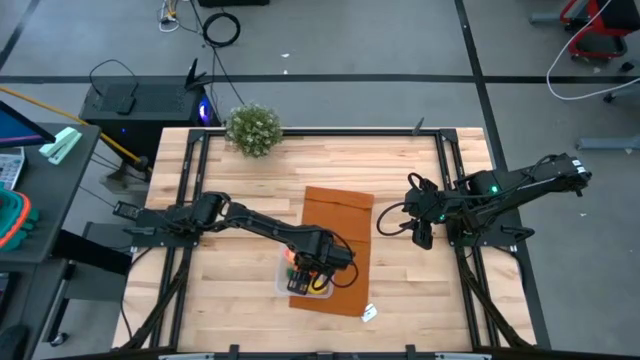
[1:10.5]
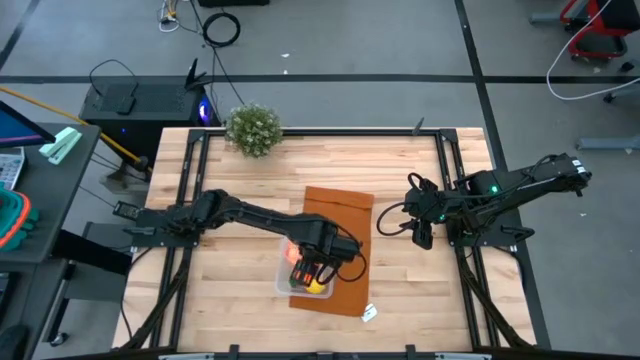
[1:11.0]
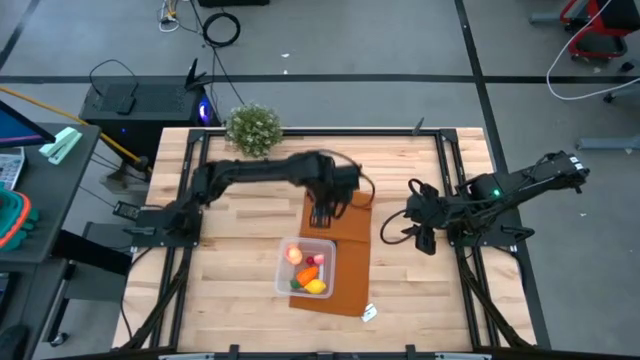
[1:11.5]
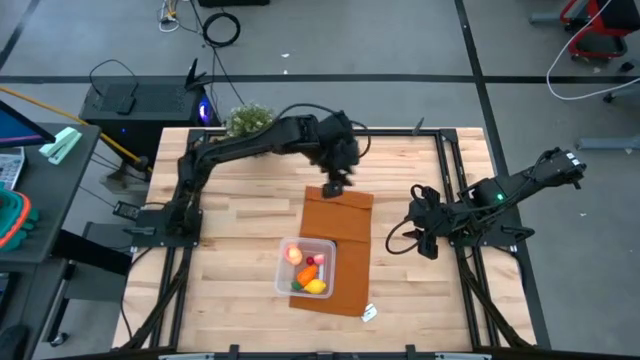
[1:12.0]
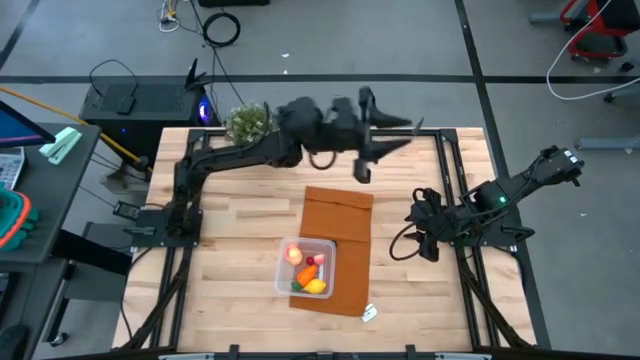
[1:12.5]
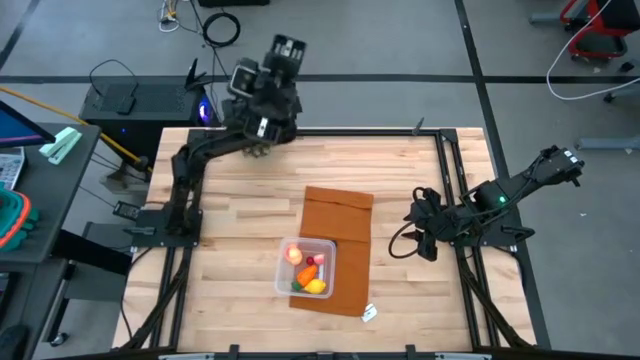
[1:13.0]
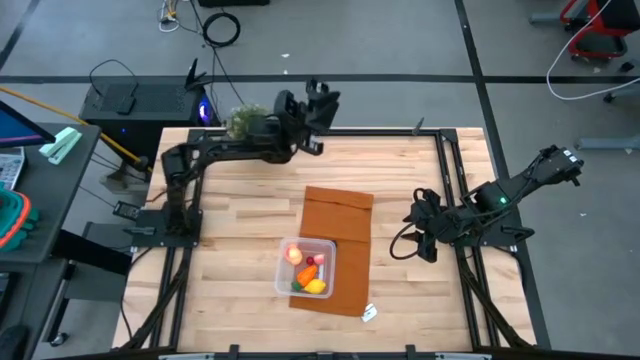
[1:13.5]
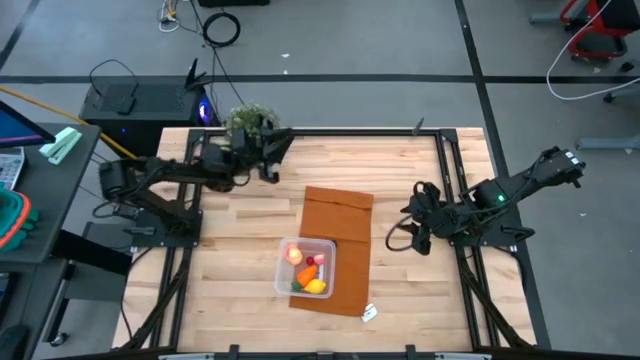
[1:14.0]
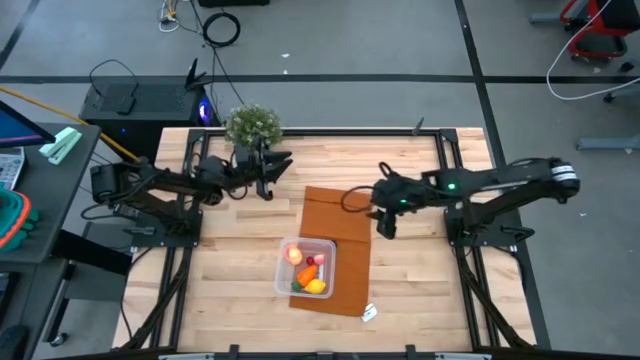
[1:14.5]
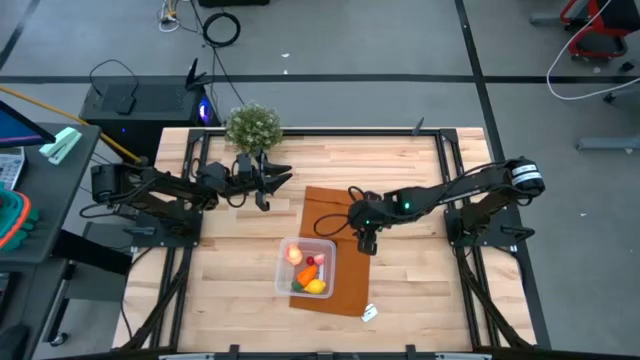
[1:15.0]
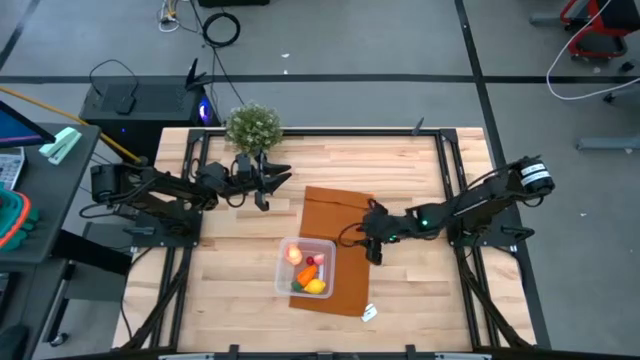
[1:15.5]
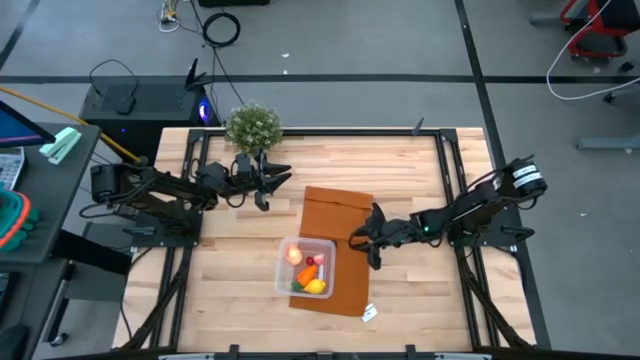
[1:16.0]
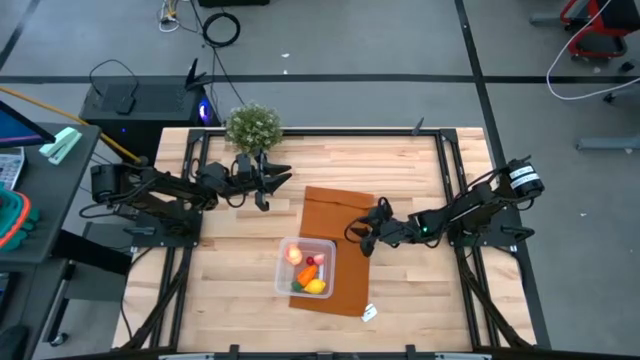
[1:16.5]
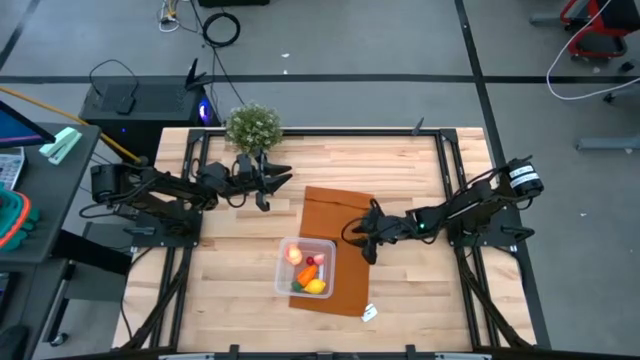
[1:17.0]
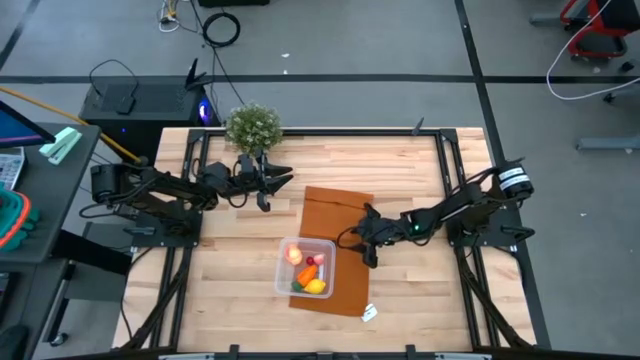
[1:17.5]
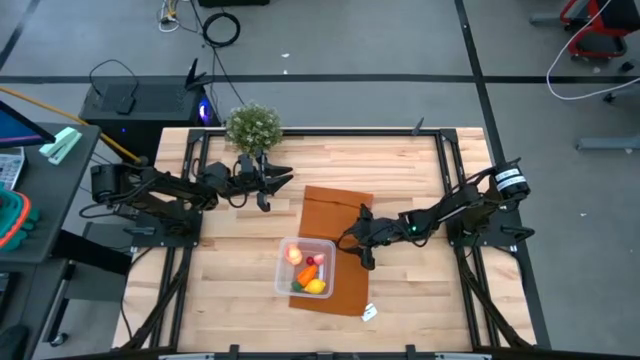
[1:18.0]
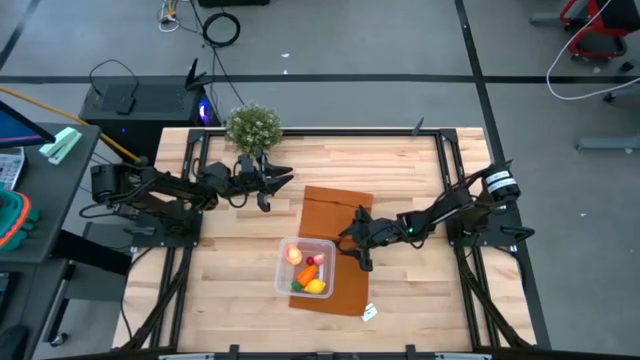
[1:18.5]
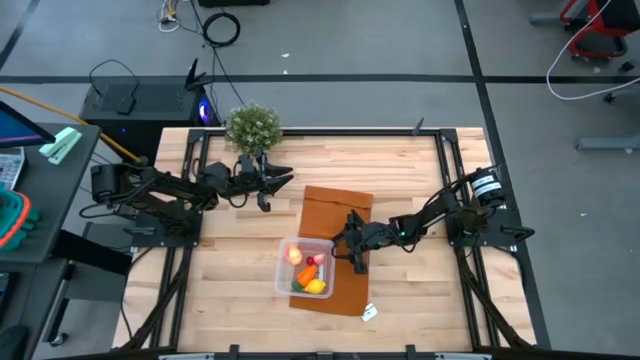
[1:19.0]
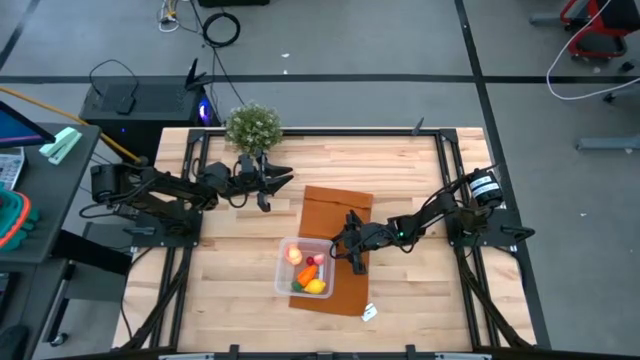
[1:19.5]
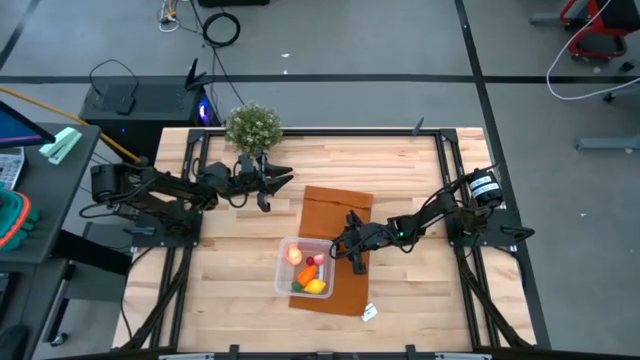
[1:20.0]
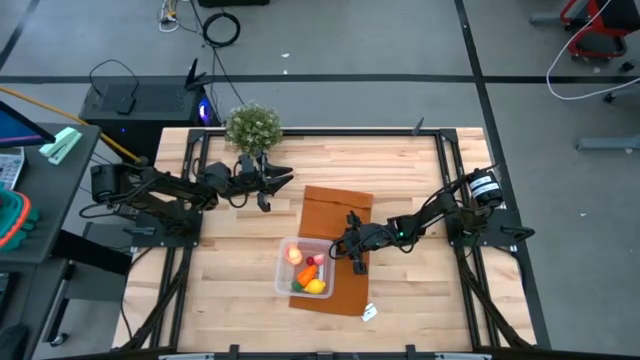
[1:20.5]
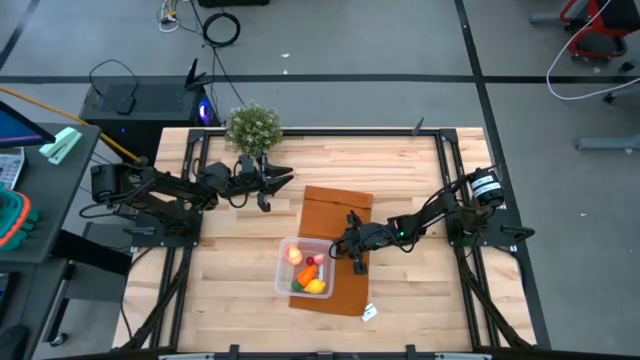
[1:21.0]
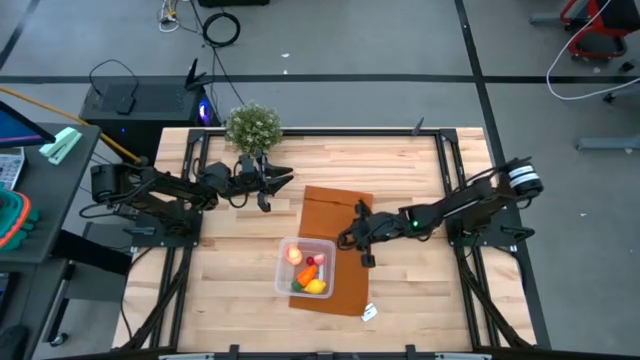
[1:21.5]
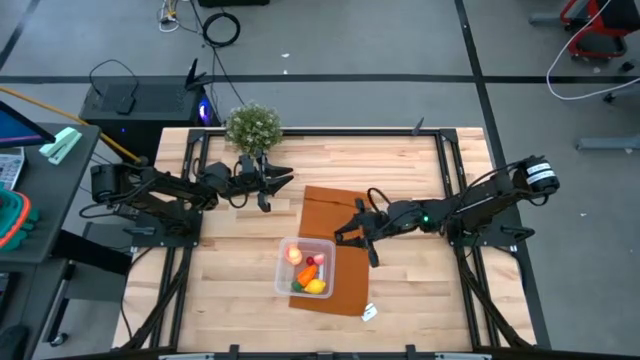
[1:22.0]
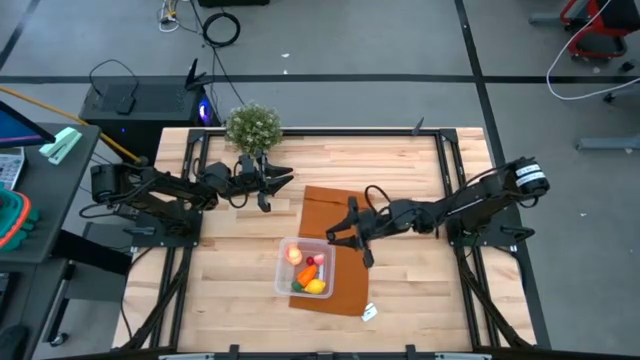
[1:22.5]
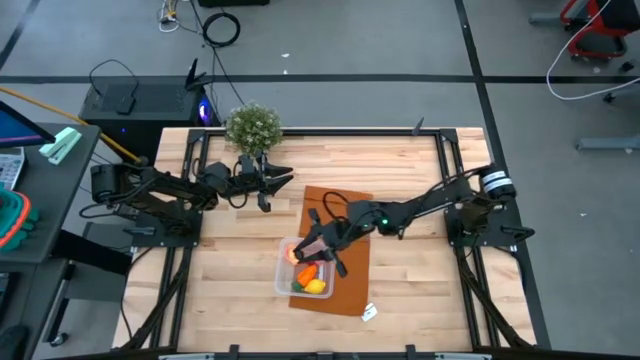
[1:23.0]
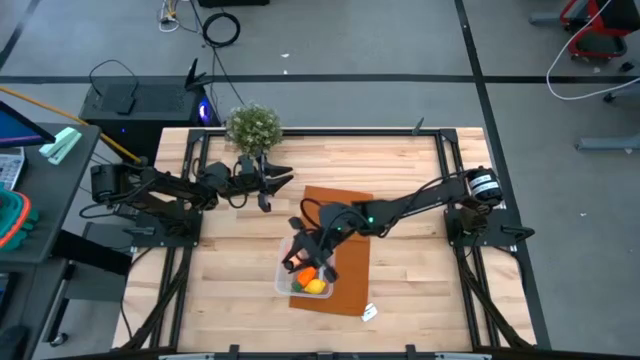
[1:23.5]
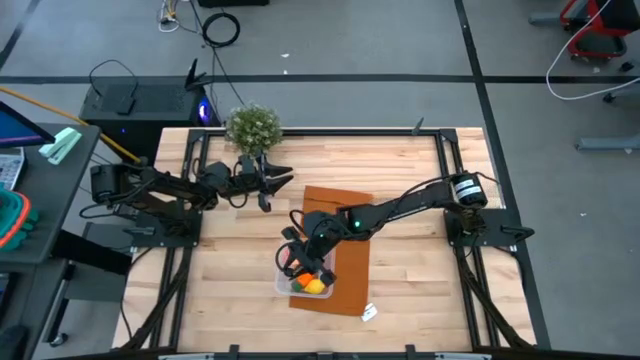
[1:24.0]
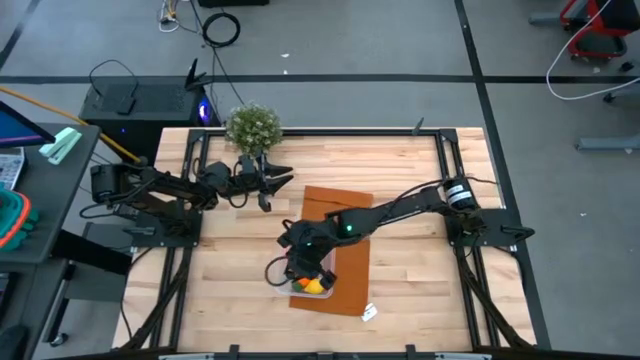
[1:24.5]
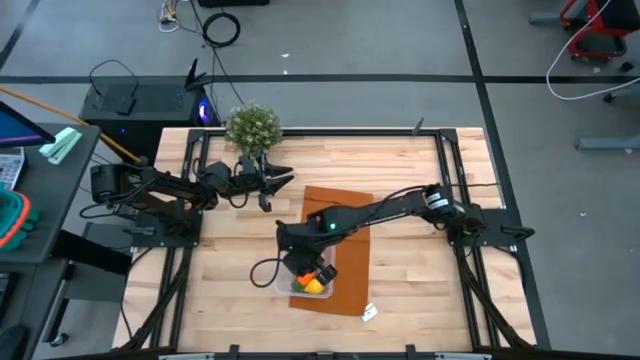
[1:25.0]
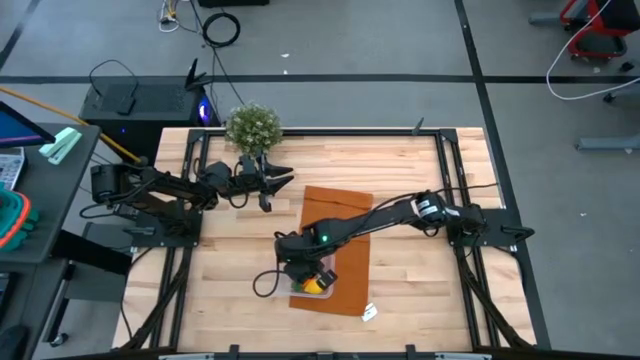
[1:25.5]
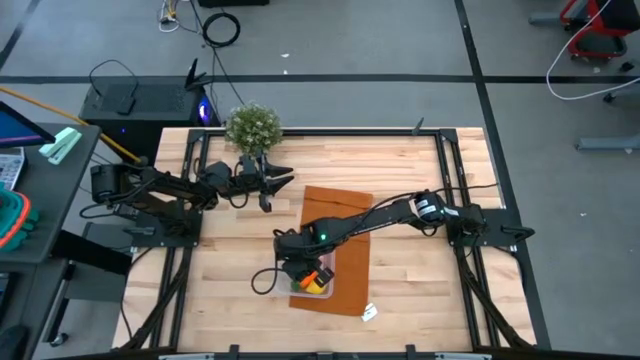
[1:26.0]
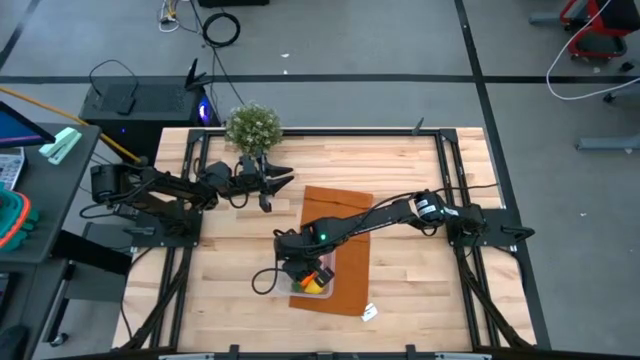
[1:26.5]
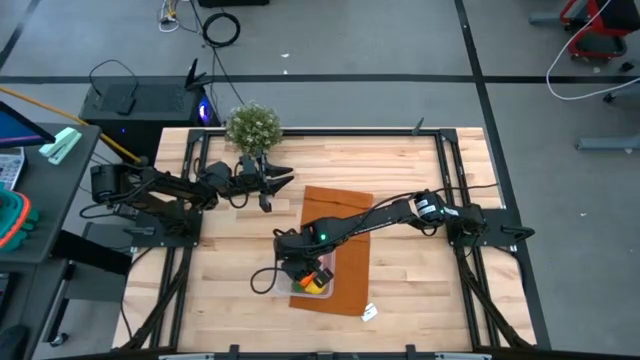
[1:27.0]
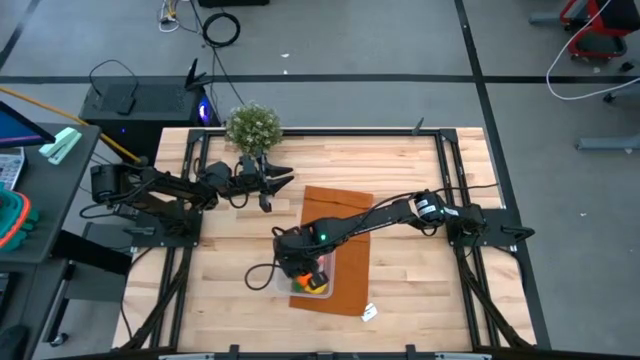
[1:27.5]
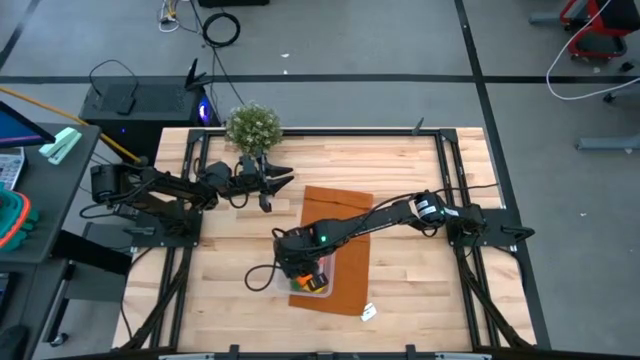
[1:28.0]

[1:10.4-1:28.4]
Task: Pick and placing Produce into tupperware
Put the black cherry into the transparent bin

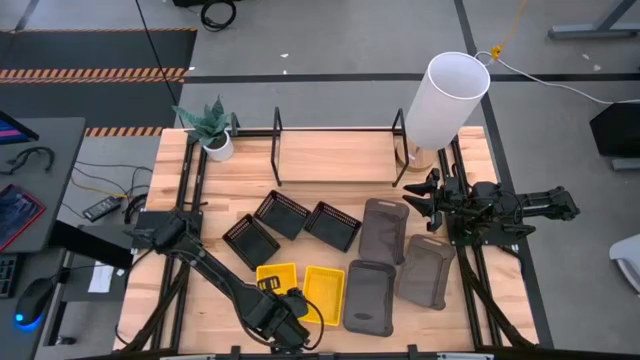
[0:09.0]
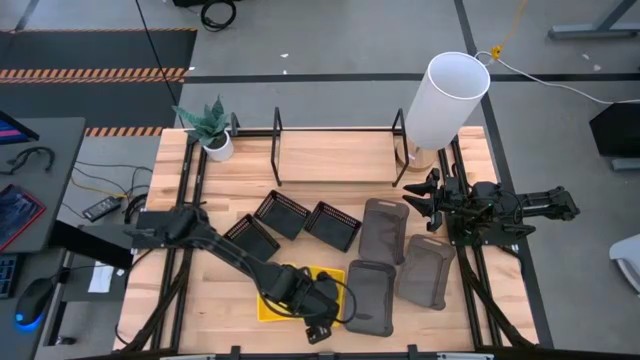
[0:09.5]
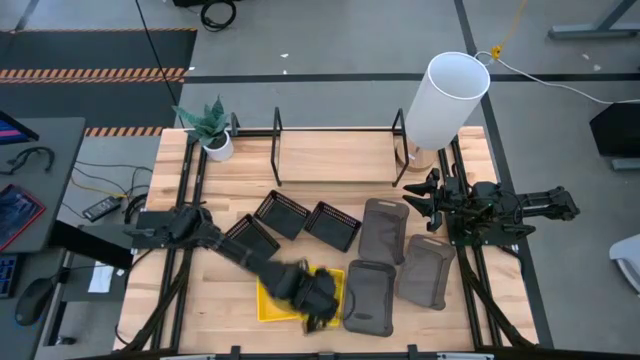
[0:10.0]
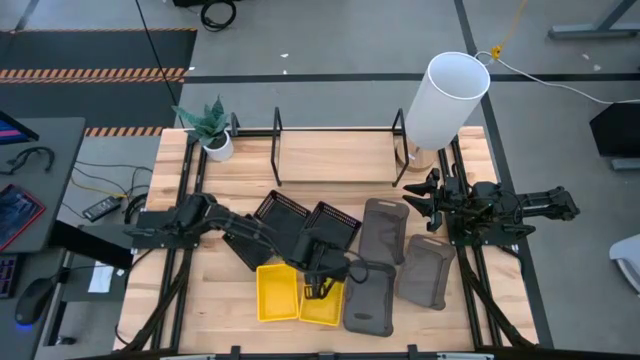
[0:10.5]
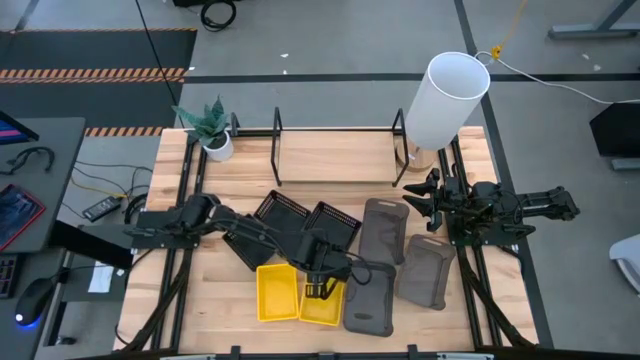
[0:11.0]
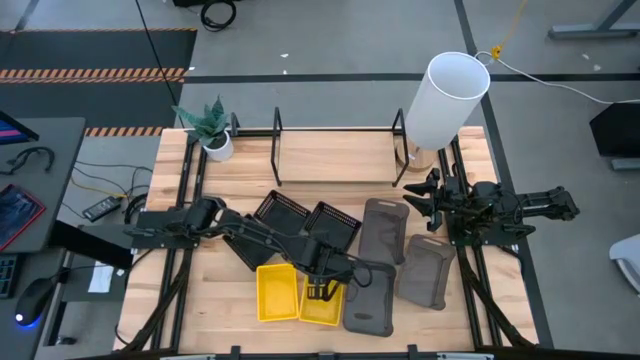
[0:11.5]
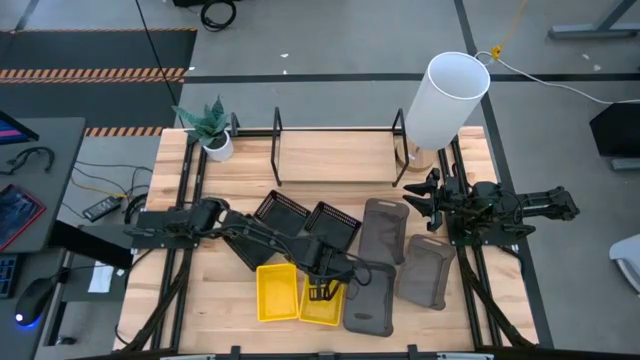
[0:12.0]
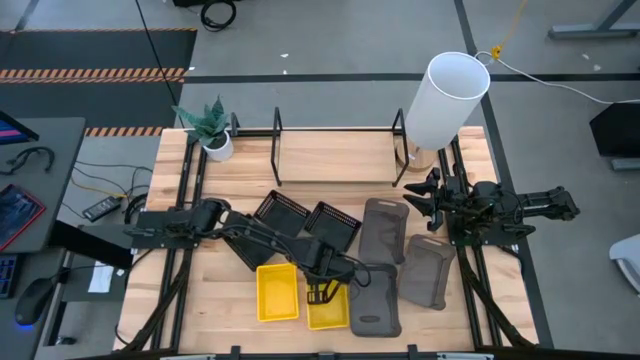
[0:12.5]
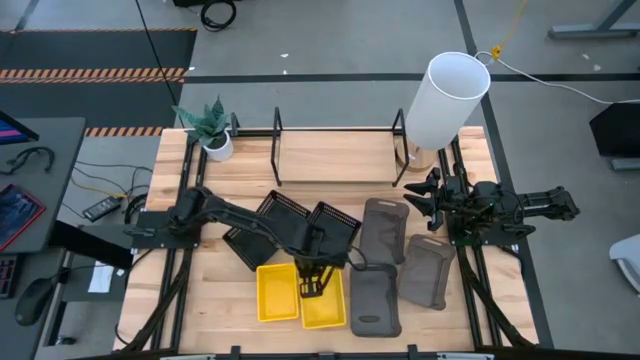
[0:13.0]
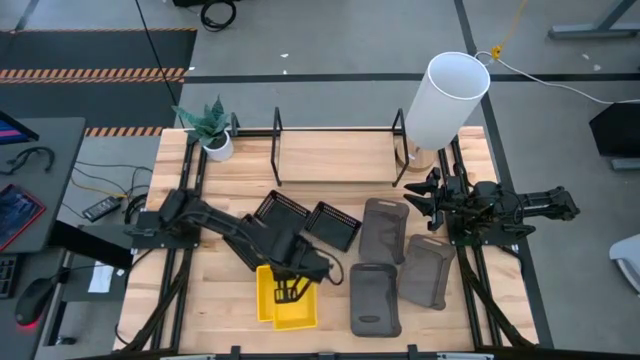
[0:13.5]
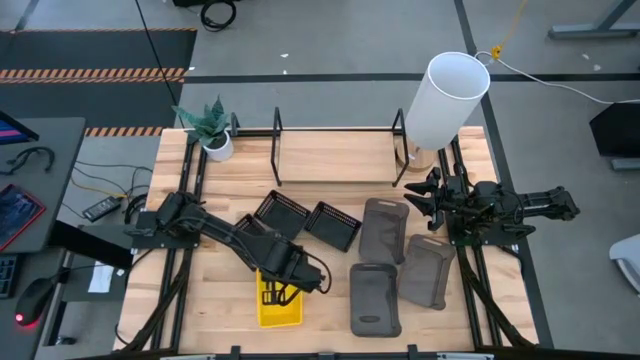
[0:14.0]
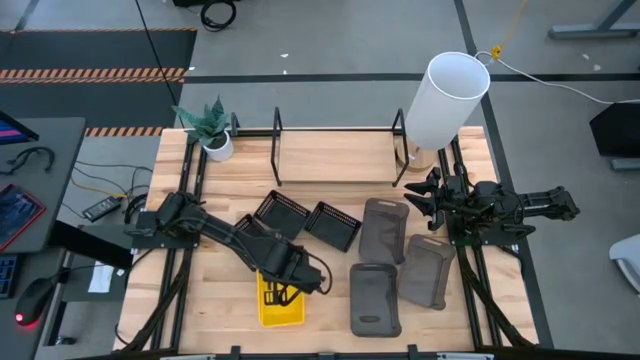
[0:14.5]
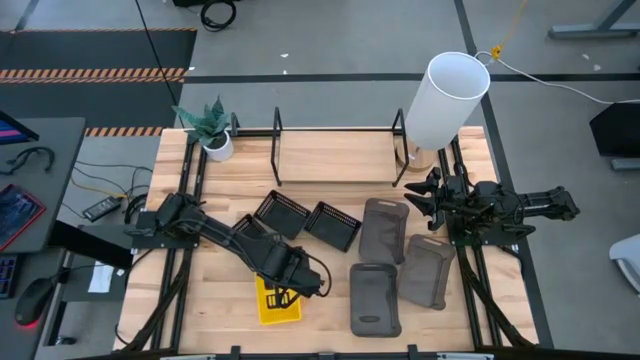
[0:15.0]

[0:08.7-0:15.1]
Task: Stack baskets on shelf by color
Stack the right yellow bin on top of the yellow bin
